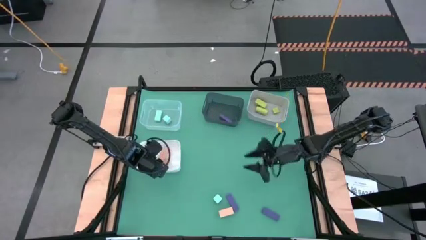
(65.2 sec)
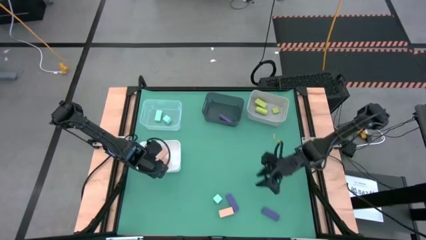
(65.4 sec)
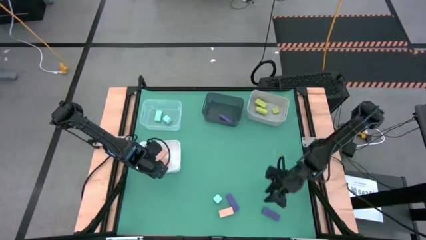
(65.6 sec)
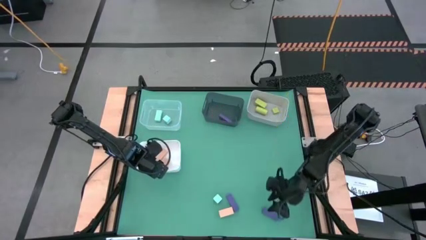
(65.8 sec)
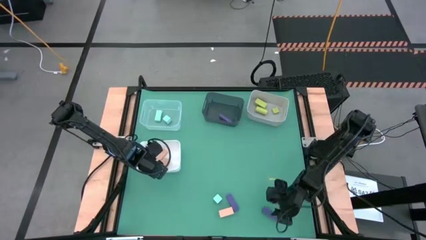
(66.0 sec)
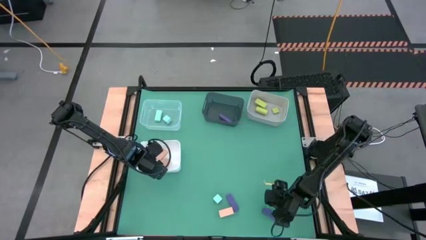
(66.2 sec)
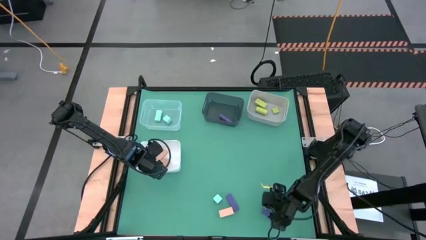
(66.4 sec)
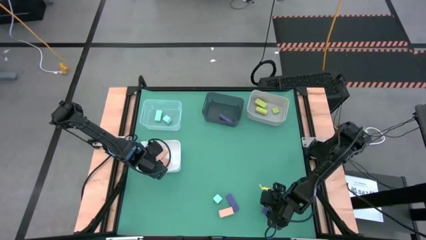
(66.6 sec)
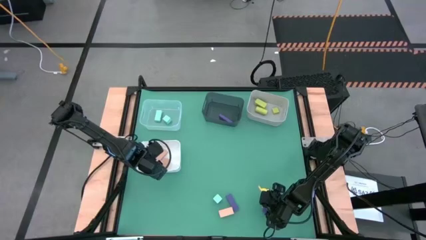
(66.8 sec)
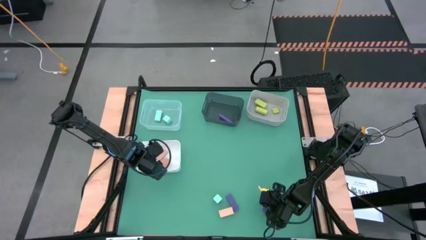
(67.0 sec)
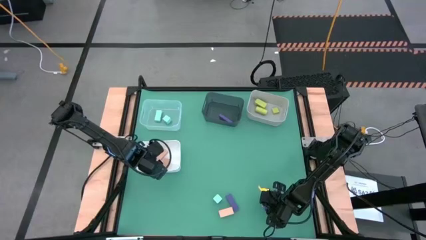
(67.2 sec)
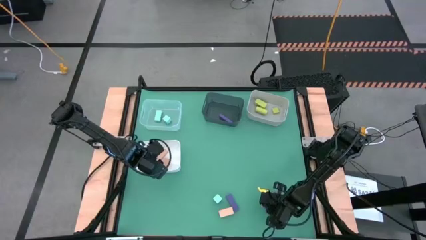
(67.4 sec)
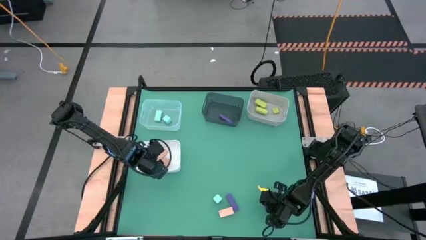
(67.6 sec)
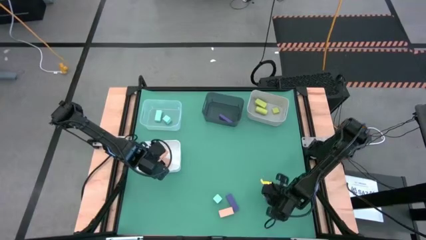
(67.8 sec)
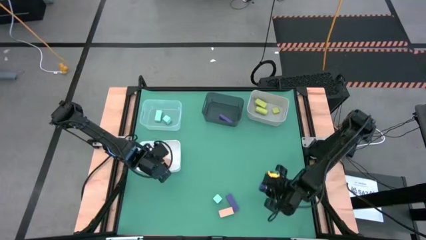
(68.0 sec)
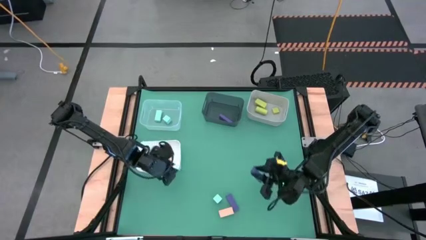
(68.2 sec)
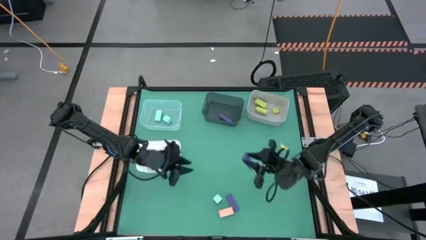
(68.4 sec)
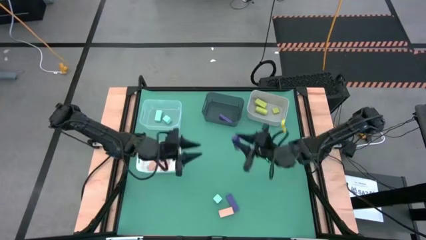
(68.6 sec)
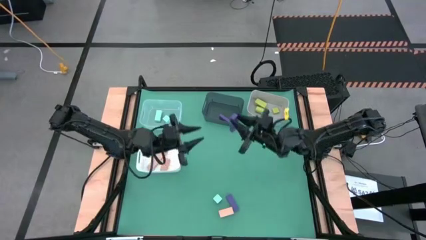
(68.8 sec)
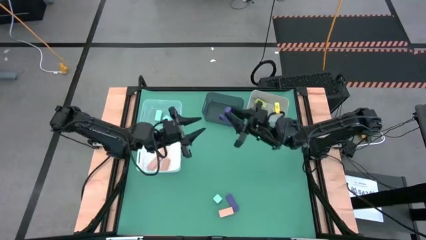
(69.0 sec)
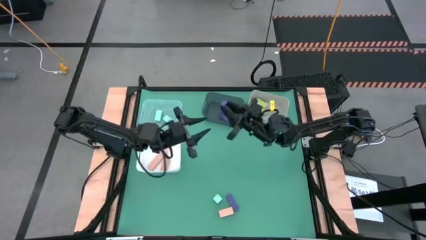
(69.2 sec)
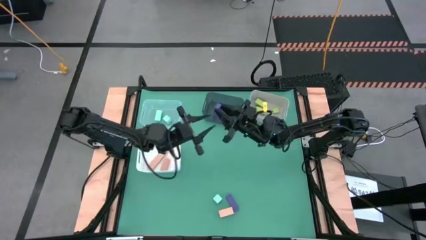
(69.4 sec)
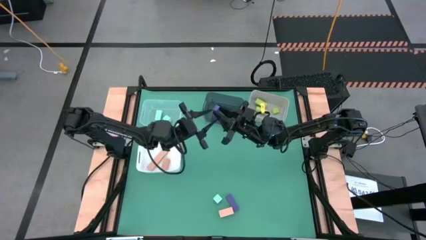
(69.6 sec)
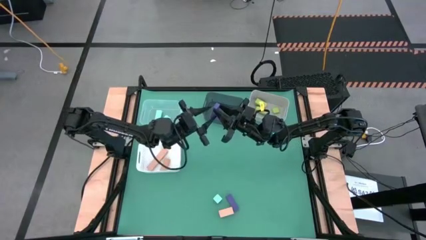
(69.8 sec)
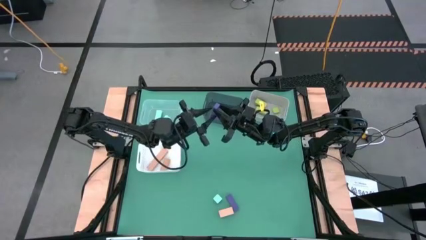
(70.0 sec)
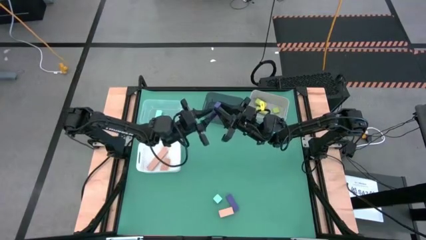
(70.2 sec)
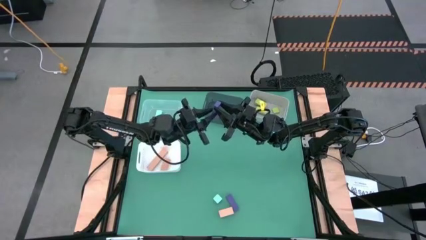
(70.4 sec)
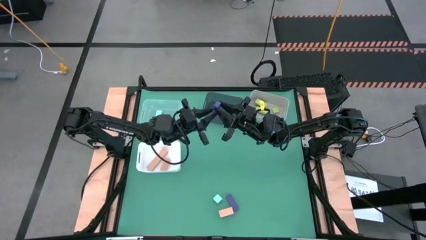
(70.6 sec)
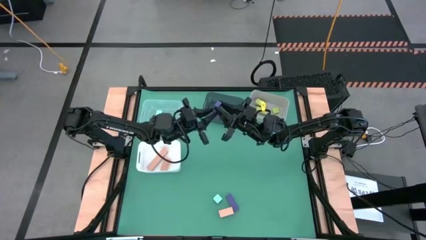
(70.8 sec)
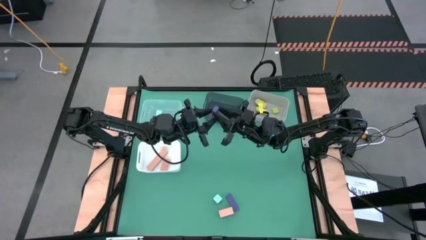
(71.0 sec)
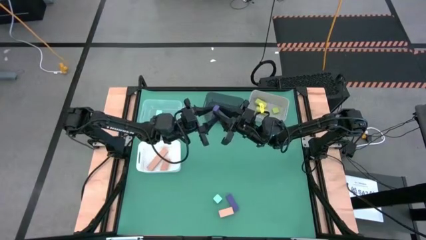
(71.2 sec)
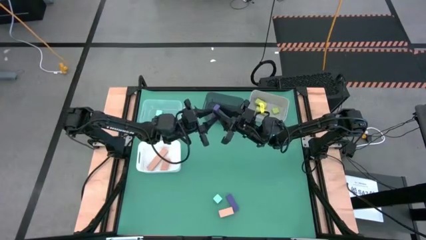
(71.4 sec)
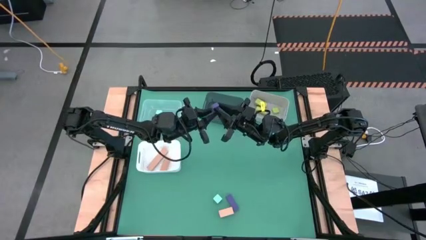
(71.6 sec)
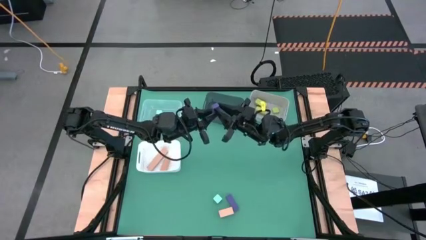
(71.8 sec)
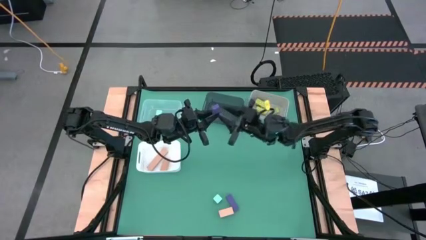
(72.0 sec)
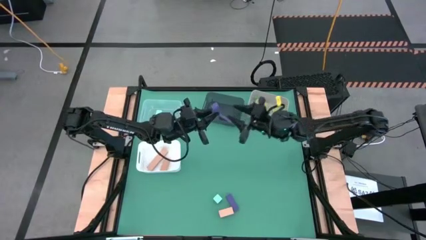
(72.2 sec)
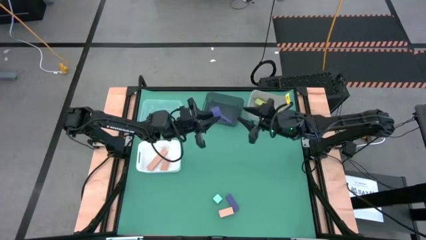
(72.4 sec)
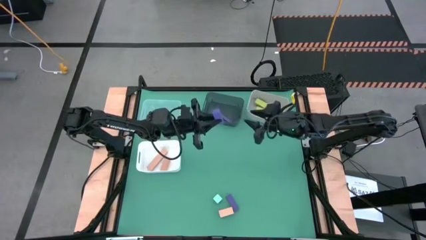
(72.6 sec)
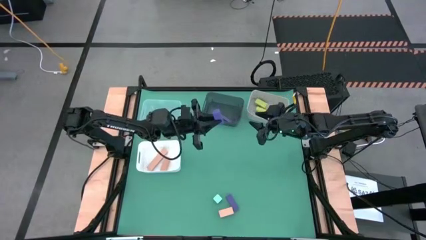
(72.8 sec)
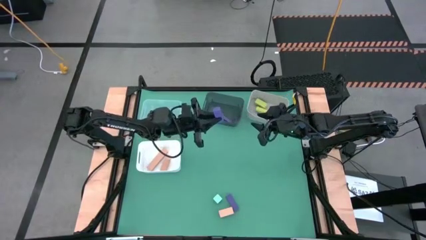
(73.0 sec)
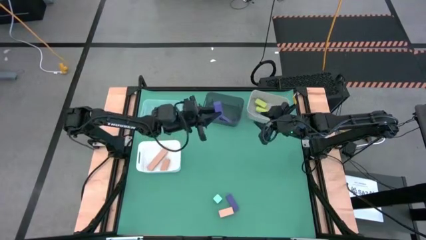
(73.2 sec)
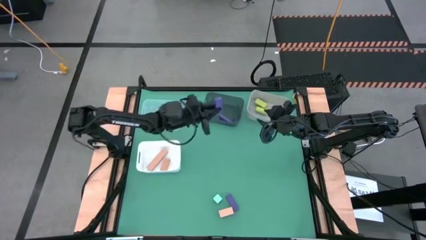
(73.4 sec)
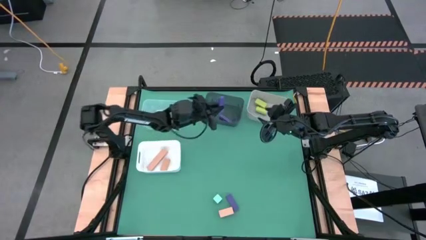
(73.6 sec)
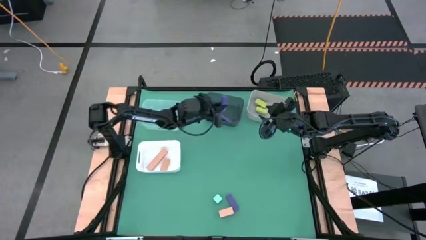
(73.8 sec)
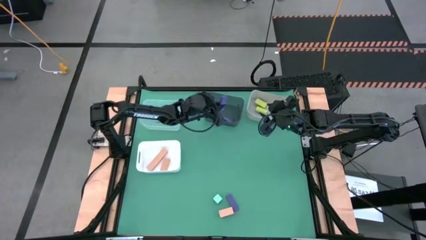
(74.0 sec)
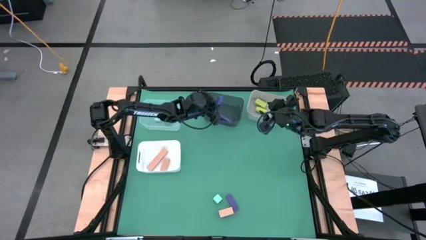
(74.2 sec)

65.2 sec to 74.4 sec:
Task: Sort & place blocks by color
Put the right violet into the black bin

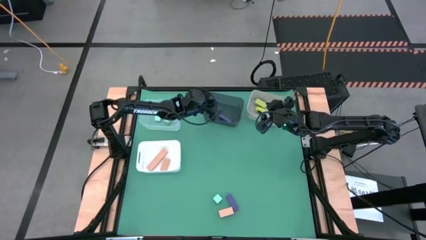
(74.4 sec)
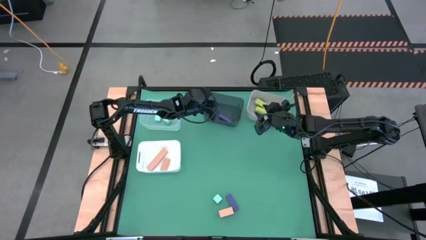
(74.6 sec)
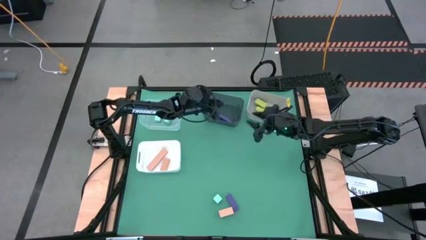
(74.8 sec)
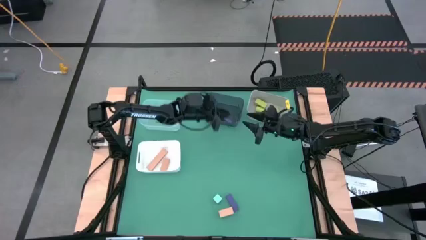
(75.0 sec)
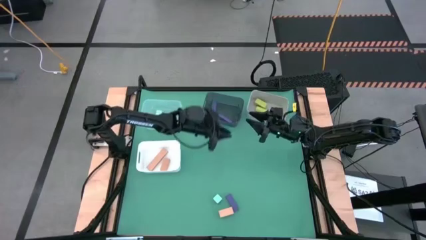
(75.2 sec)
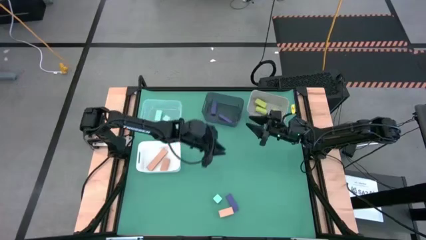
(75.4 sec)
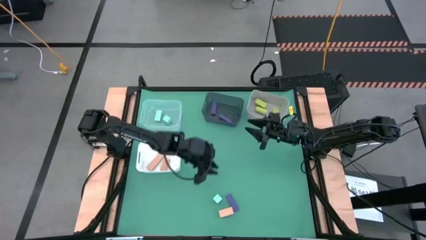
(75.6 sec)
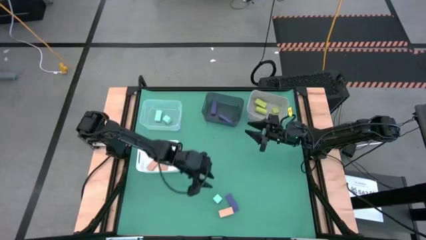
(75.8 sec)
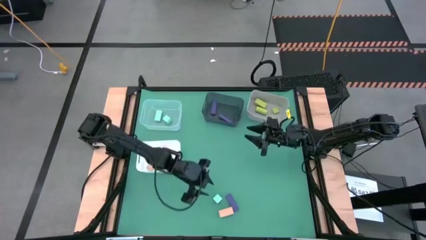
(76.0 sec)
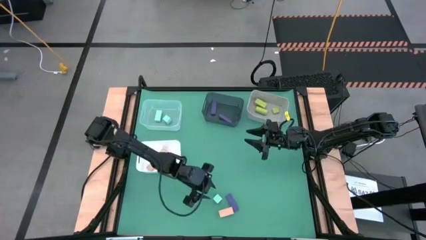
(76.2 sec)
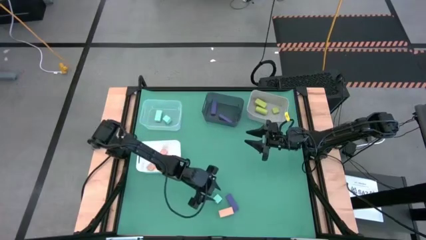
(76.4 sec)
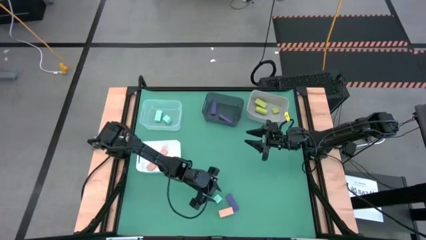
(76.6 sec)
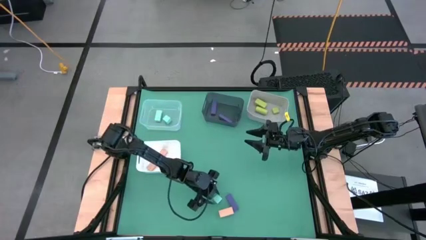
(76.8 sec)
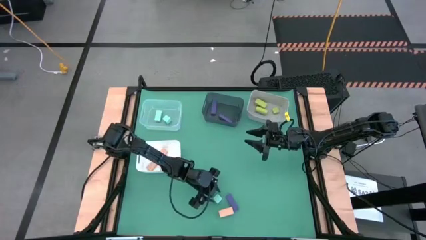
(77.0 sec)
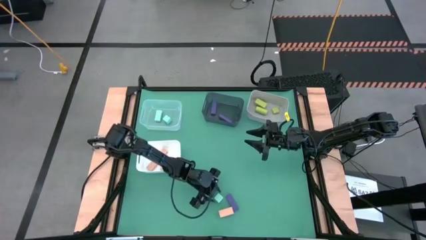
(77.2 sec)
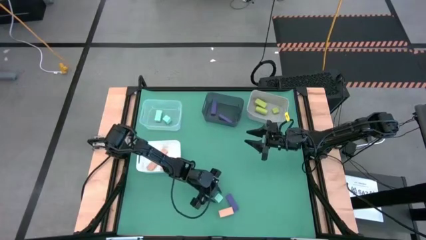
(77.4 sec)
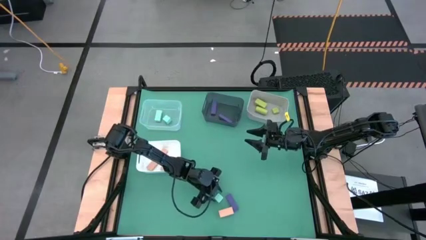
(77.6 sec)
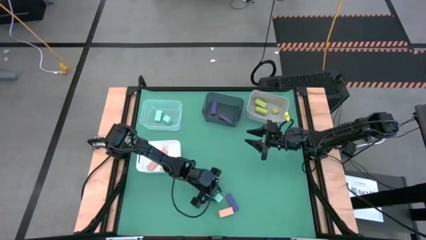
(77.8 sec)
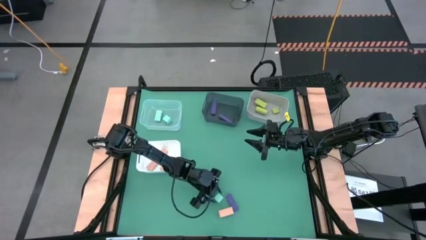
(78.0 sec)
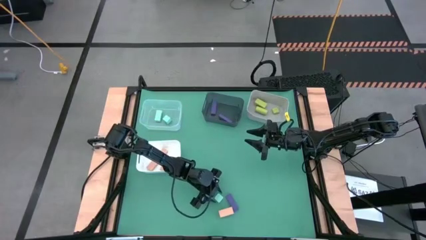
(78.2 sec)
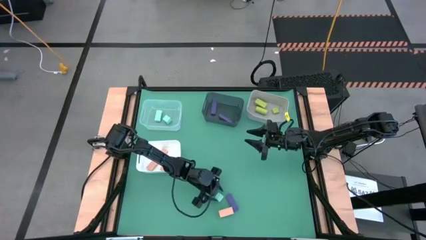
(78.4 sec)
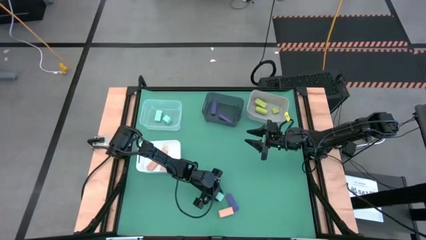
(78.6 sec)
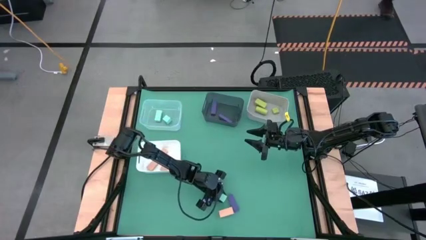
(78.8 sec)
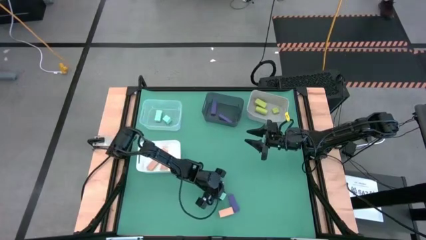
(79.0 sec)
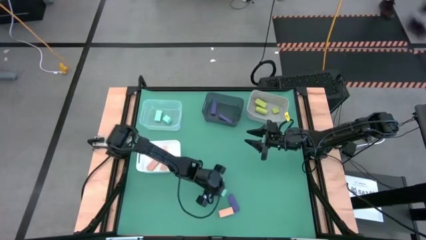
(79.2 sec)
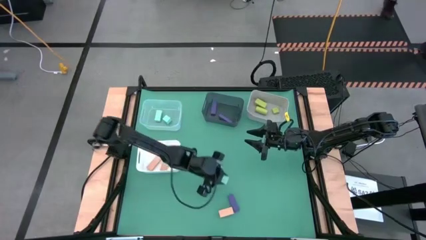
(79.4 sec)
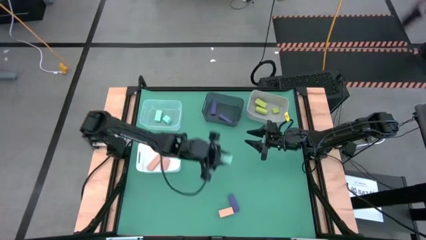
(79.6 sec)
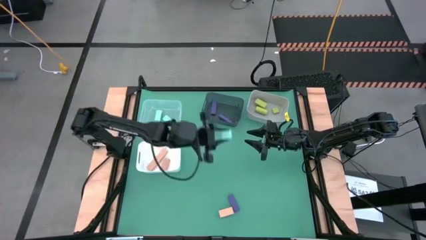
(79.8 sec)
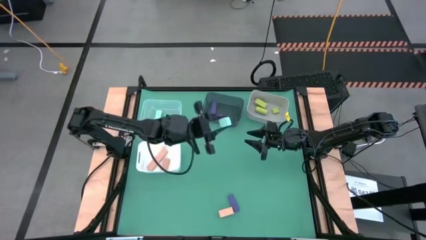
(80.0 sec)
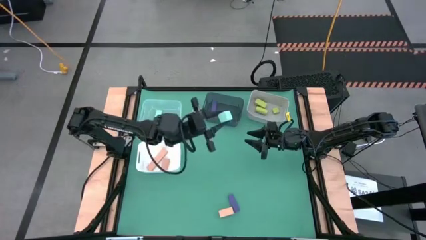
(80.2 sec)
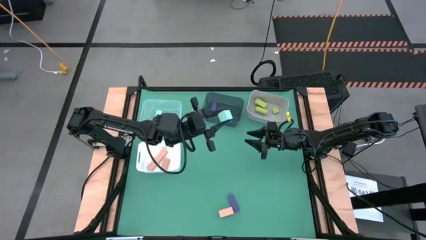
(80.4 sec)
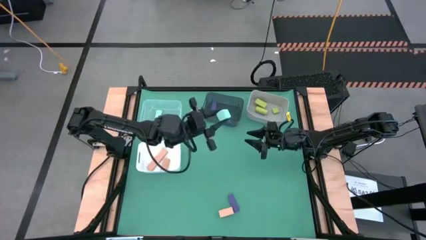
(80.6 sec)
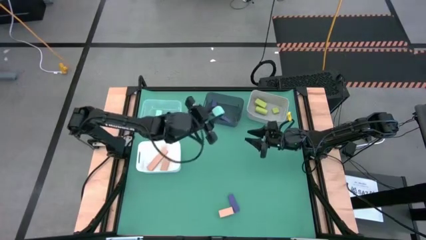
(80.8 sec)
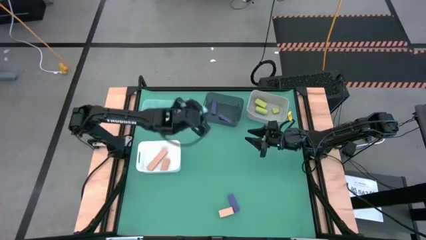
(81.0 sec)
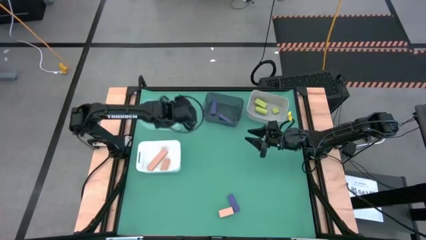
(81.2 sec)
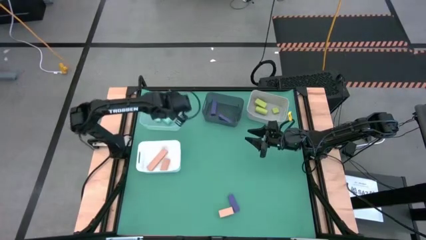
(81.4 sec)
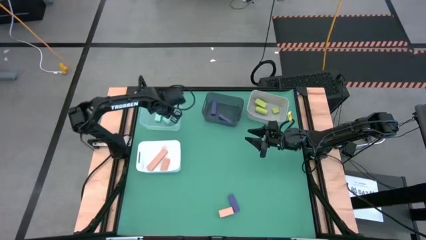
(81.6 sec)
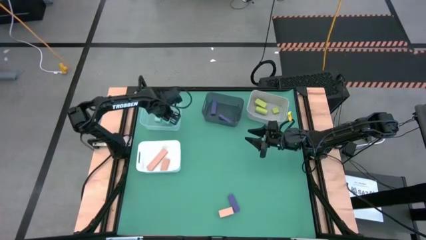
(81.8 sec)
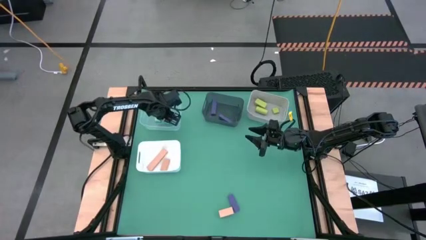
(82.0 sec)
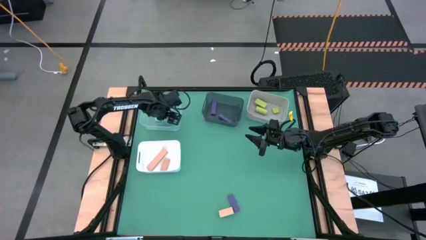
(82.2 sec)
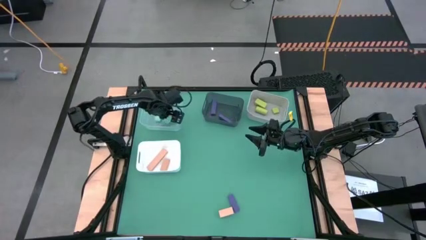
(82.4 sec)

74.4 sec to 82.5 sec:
Put the blue block into the transparent bin
